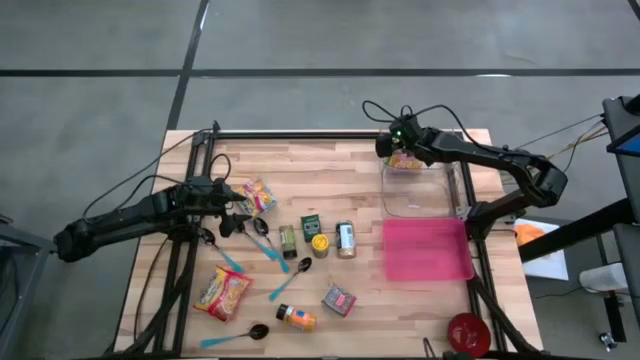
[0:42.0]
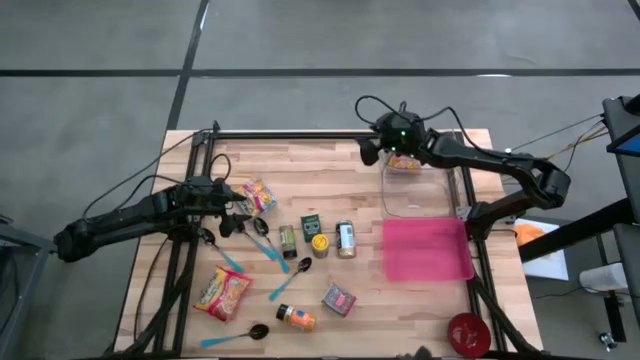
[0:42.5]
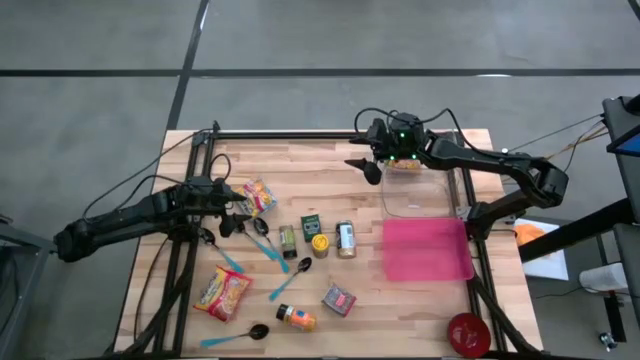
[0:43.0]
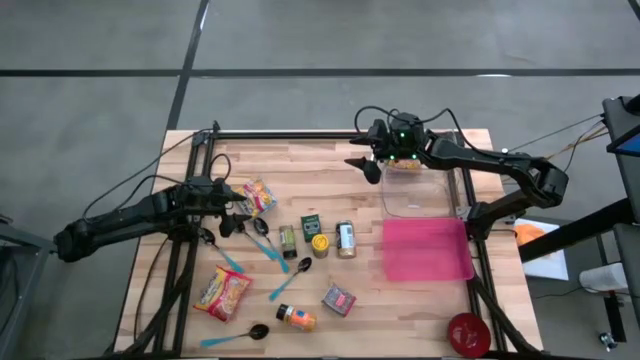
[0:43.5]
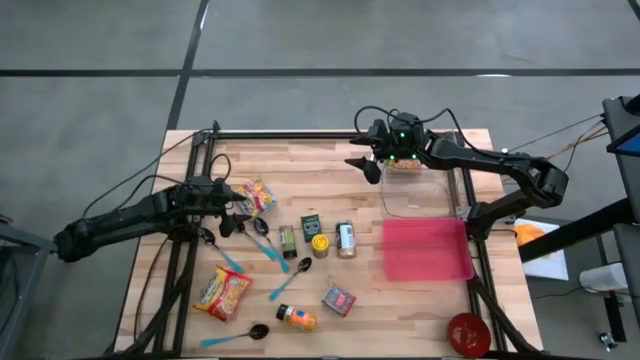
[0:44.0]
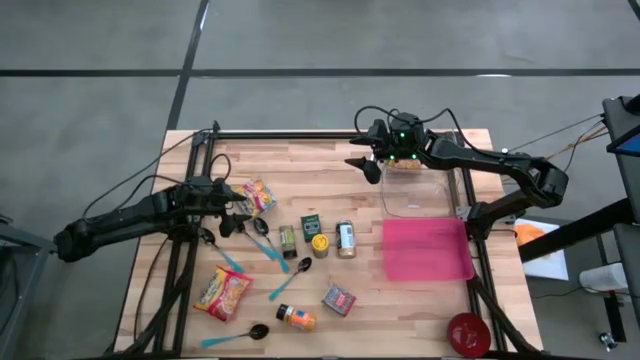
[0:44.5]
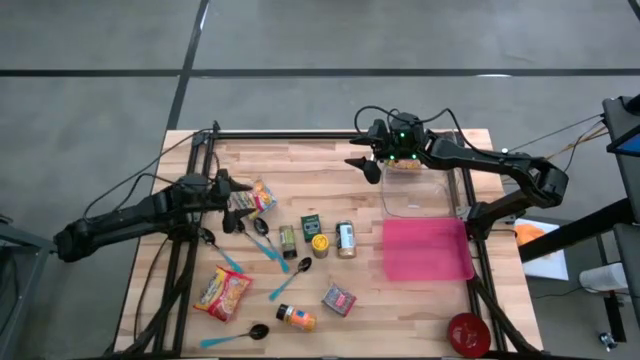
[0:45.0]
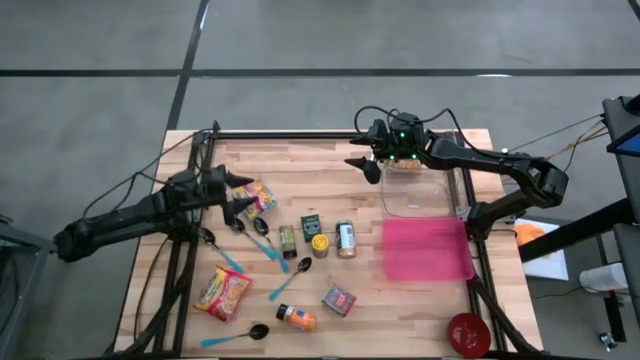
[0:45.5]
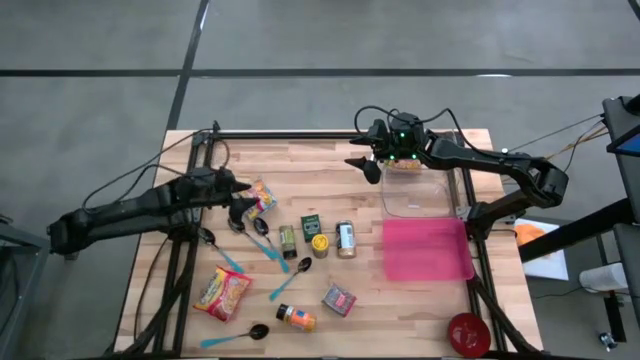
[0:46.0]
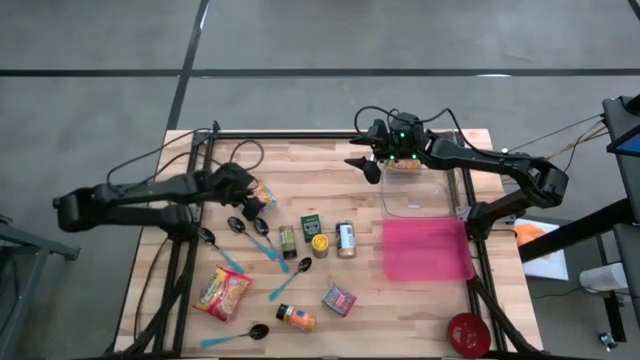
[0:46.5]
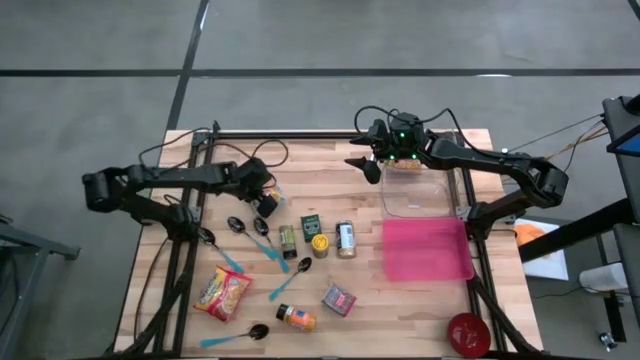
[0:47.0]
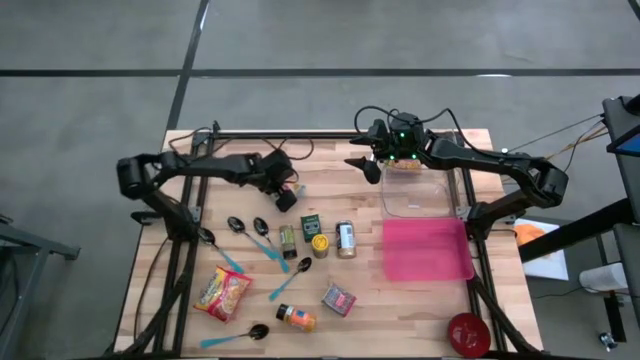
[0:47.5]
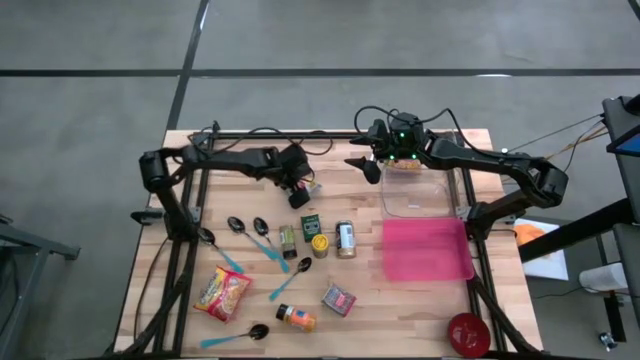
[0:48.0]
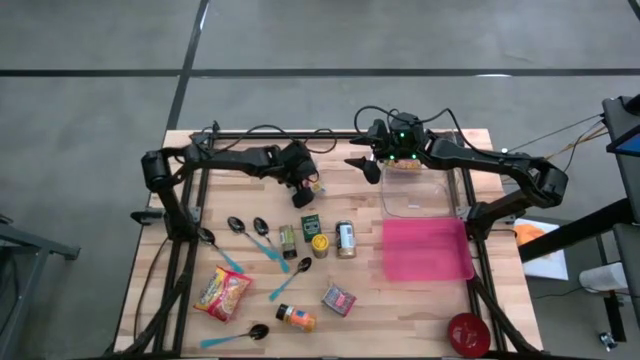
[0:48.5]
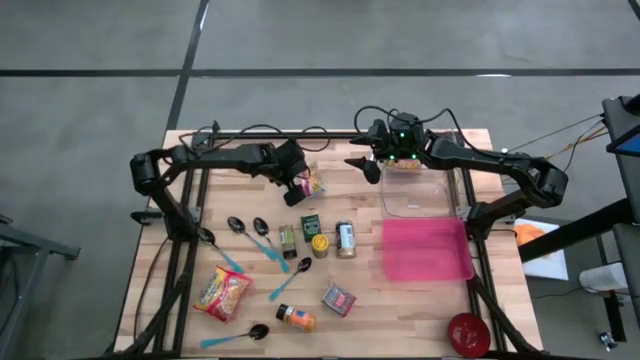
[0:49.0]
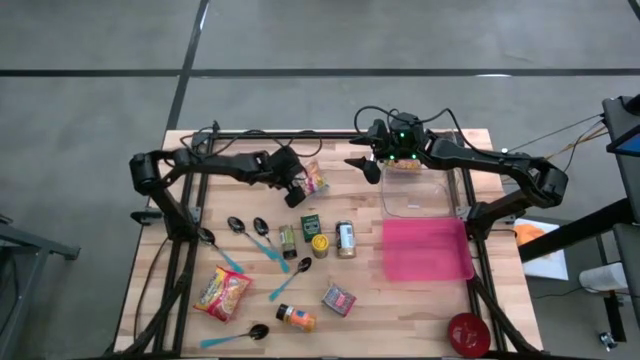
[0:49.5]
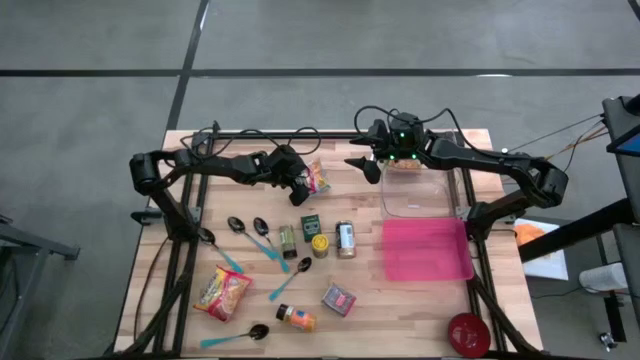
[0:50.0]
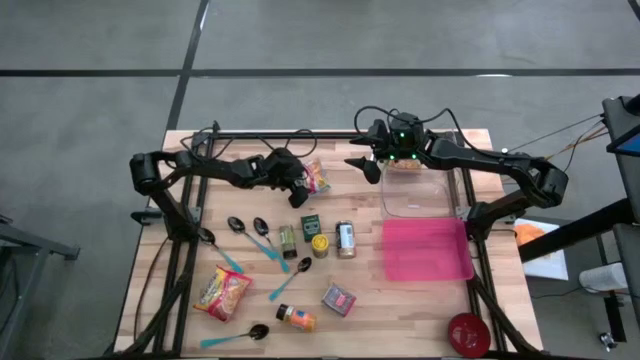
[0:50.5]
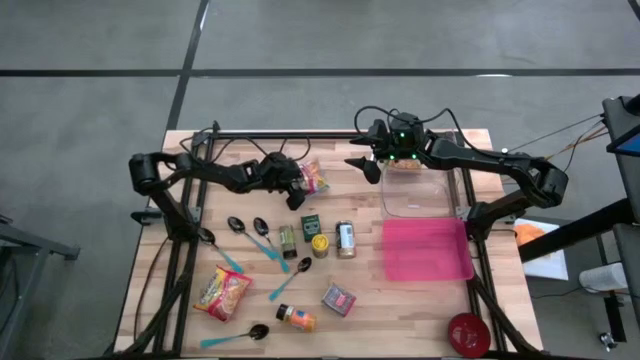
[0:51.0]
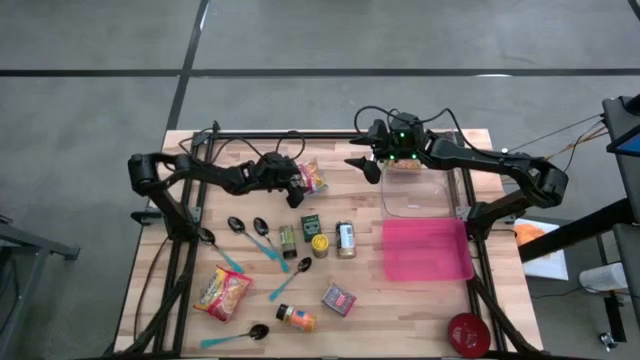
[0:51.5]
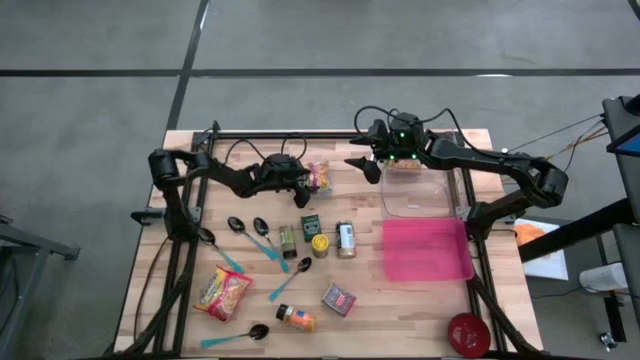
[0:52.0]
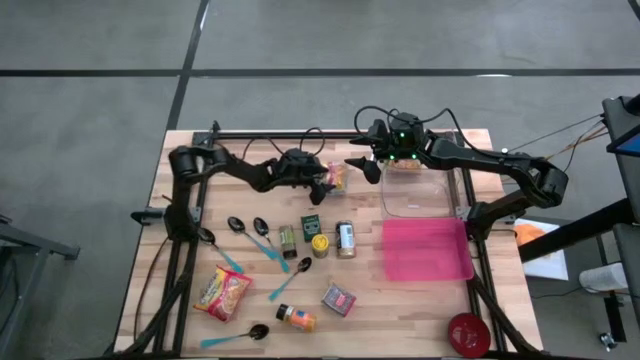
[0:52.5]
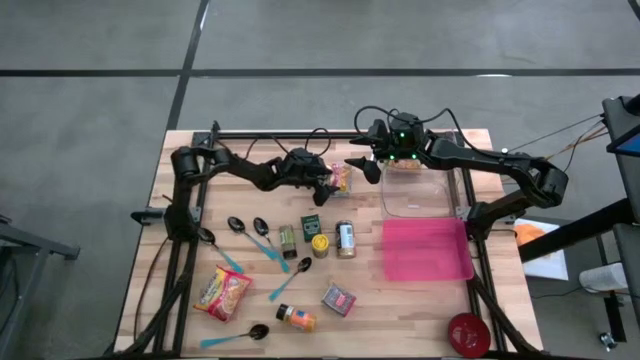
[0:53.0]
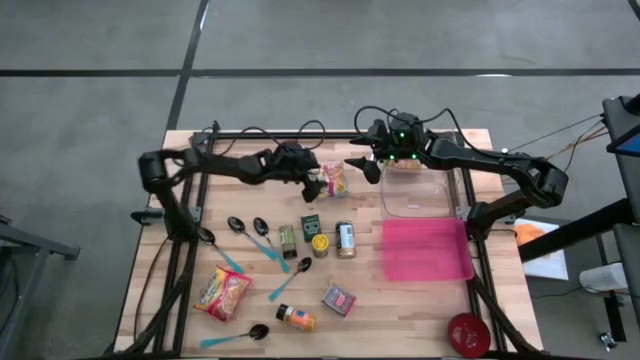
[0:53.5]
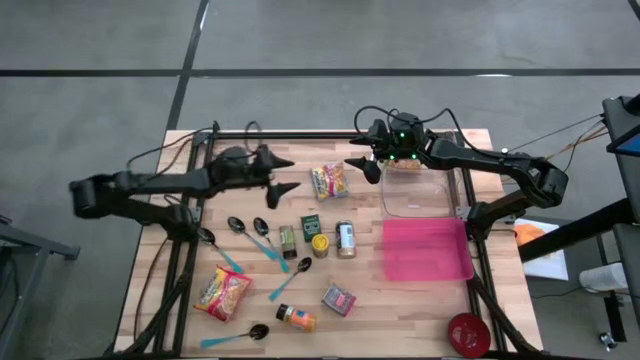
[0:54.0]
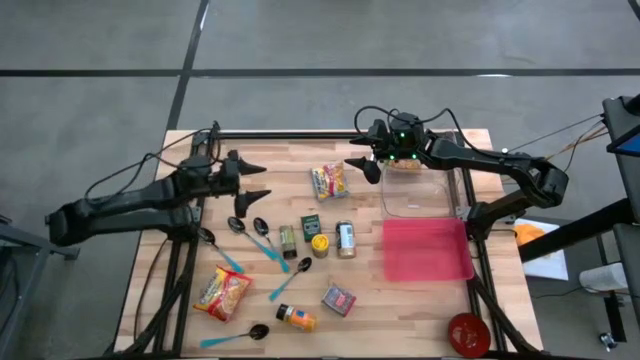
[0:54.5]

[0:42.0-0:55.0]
Put the light blue noodle pack into the top transparent bin
